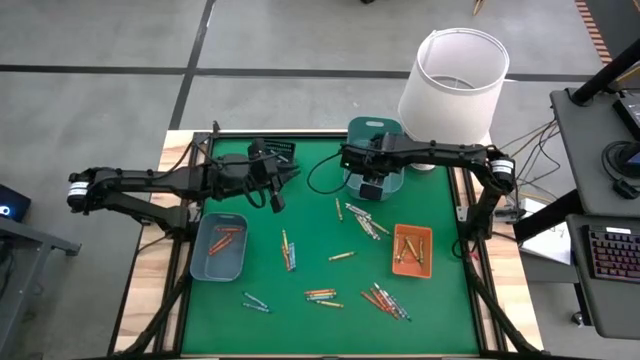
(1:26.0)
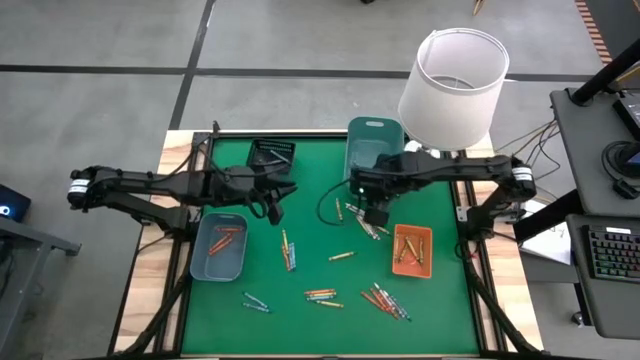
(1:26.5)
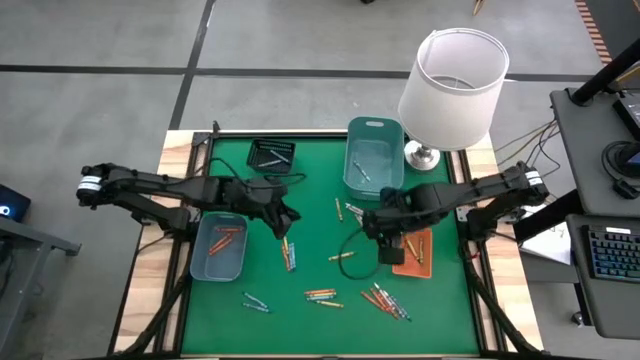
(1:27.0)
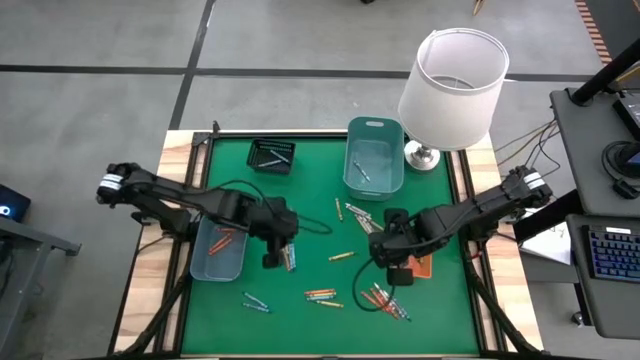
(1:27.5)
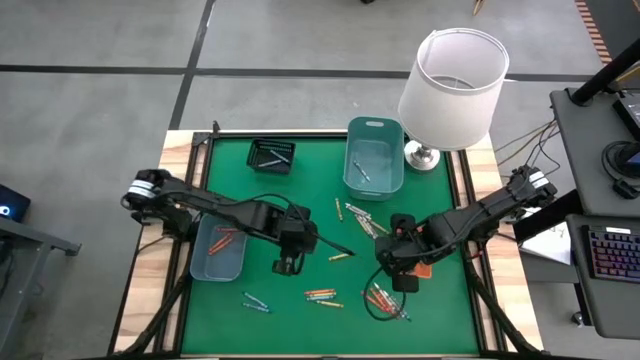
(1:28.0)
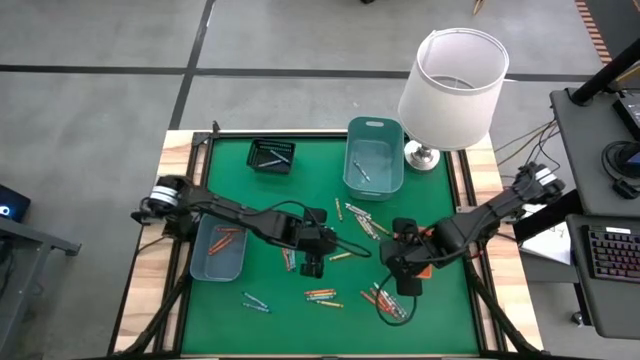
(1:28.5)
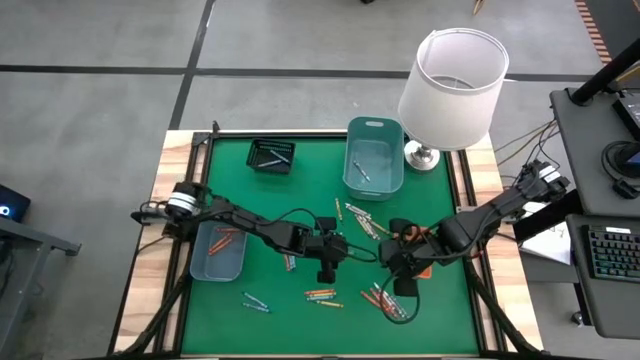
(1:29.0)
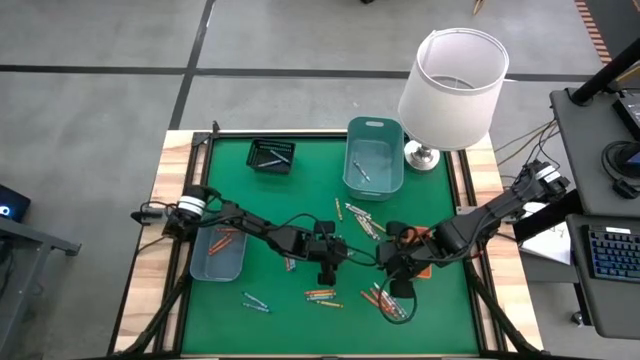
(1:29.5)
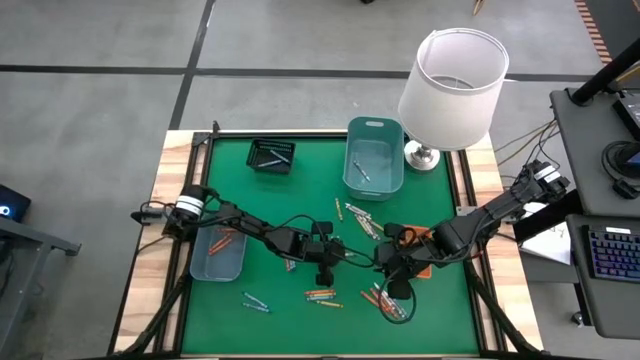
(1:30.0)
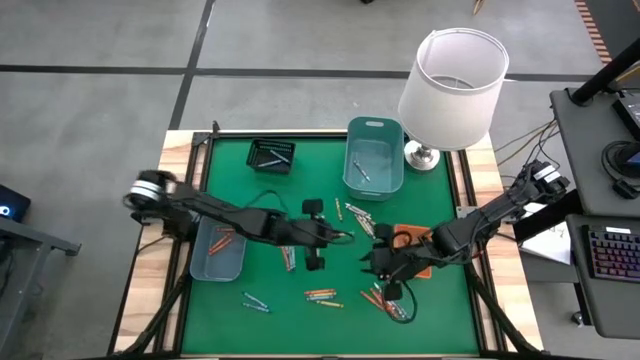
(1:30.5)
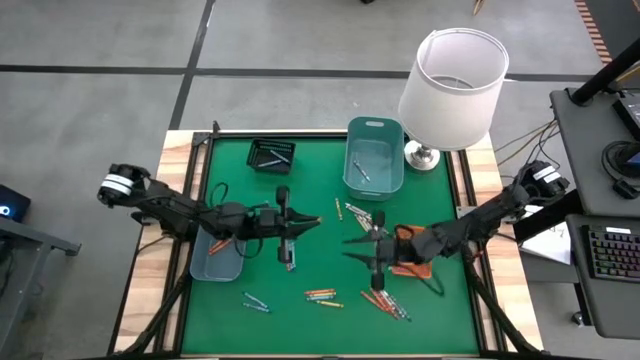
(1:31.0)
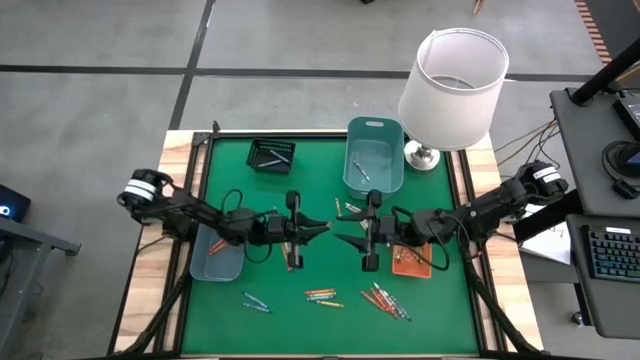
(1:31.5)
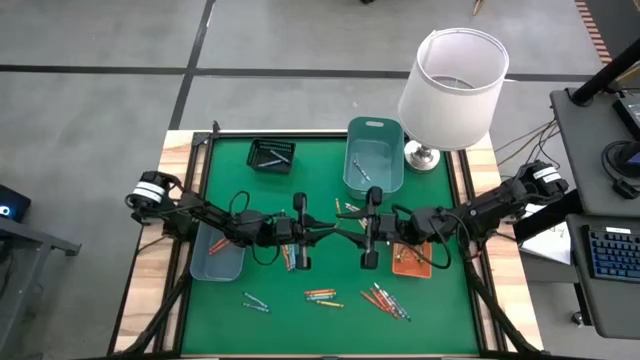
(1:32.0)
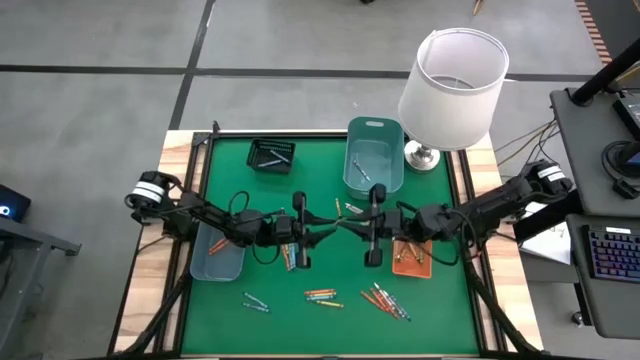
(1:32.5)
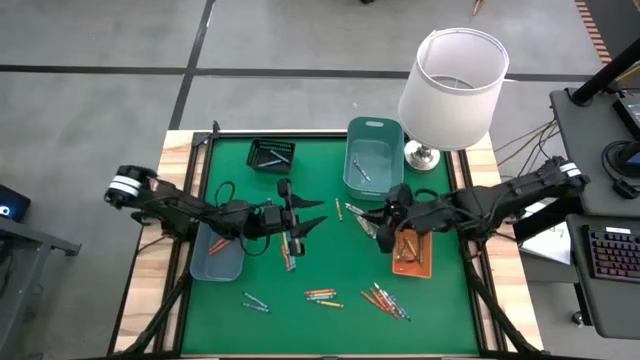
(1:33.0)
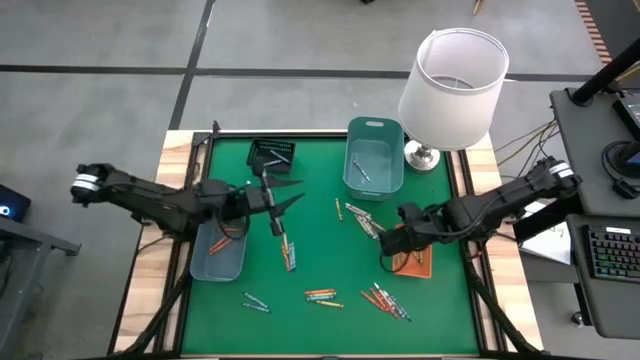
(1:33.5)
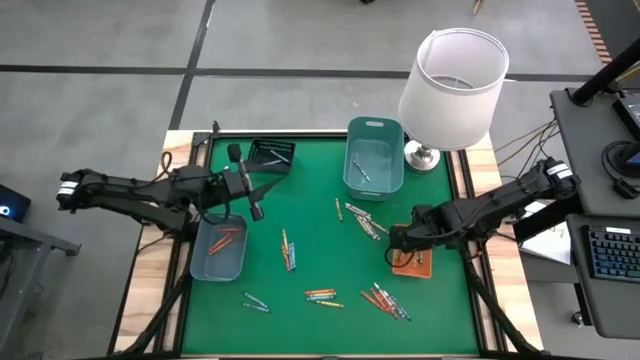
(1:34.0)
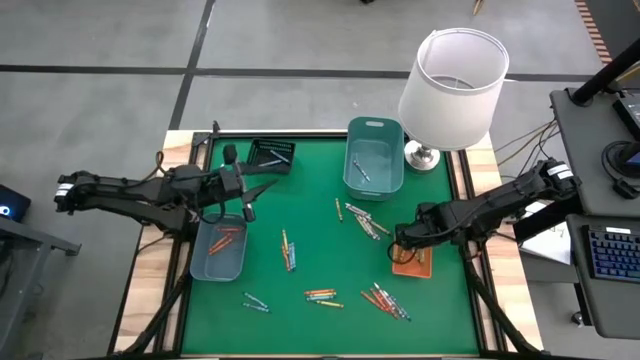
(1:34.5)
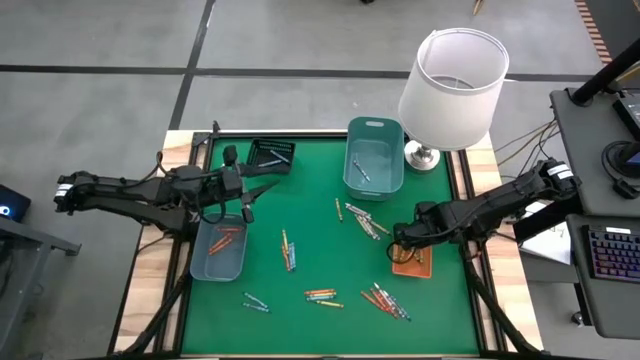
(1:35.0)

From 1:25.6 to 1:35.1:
Task: Sort crayons
Put the green crayon into the orange bin

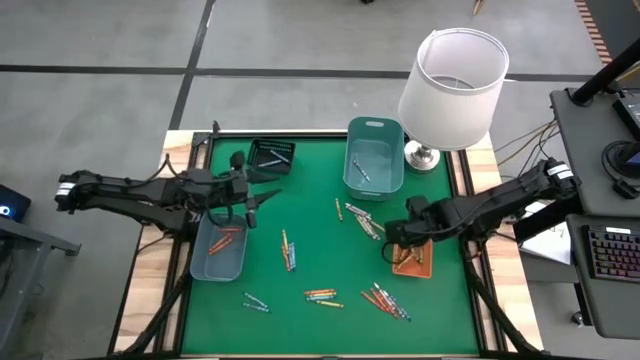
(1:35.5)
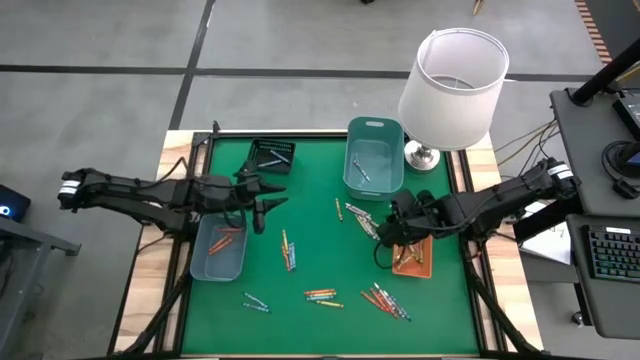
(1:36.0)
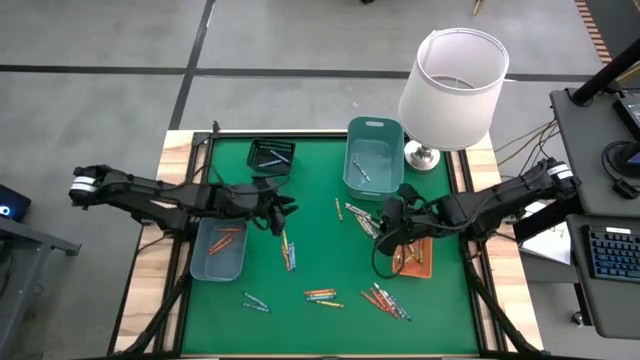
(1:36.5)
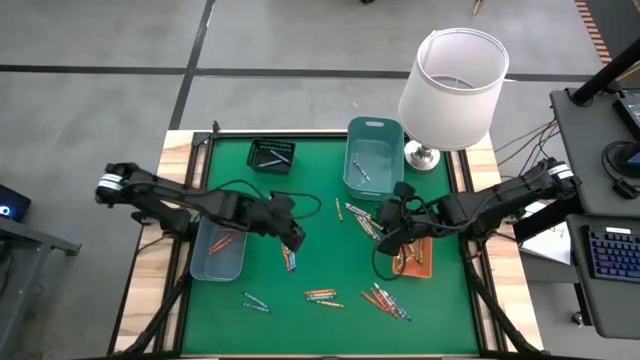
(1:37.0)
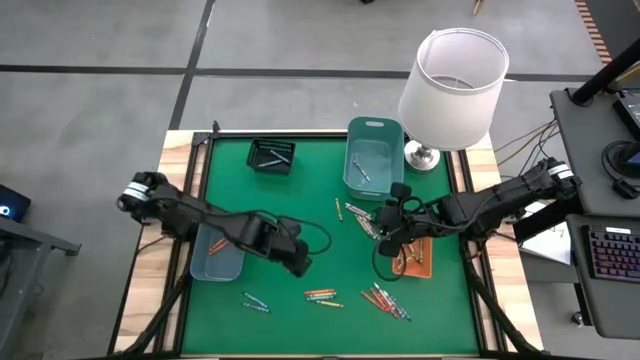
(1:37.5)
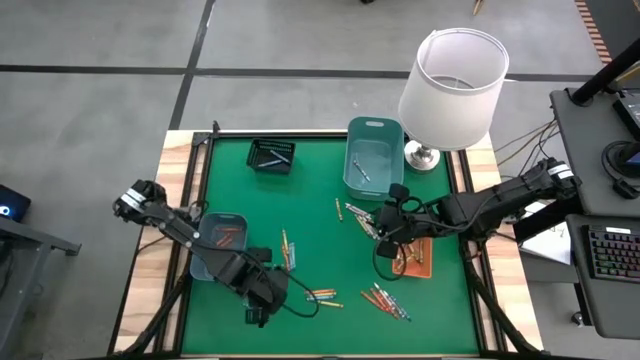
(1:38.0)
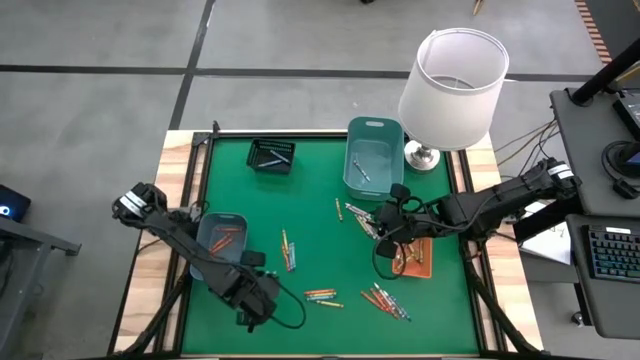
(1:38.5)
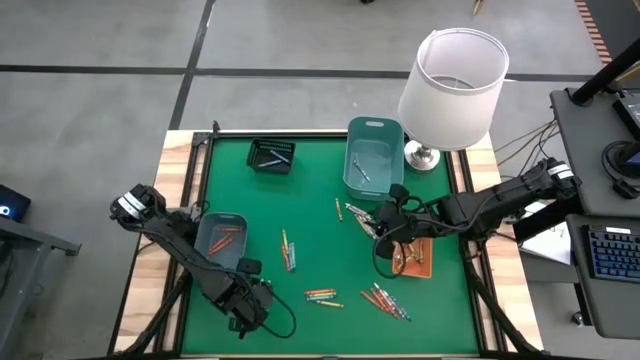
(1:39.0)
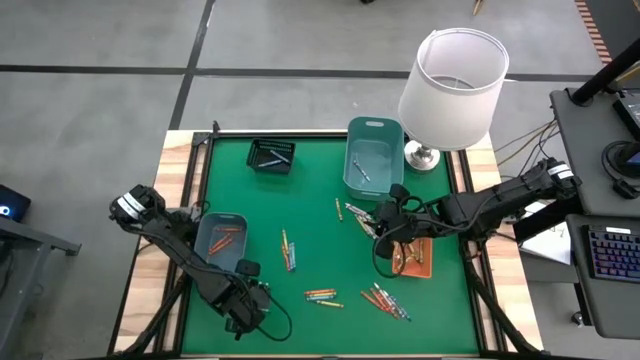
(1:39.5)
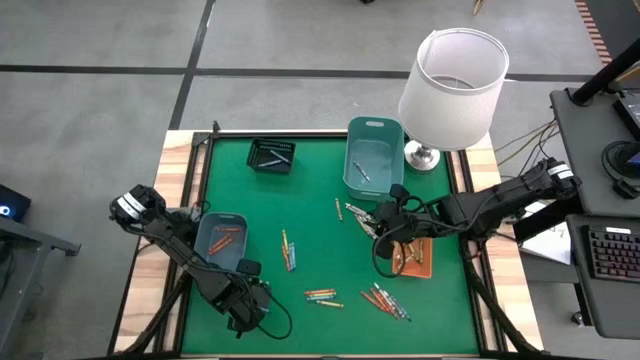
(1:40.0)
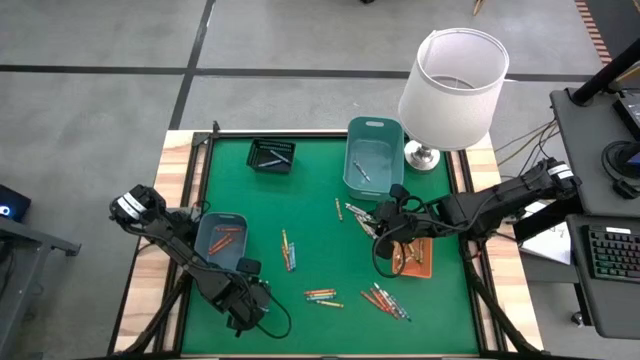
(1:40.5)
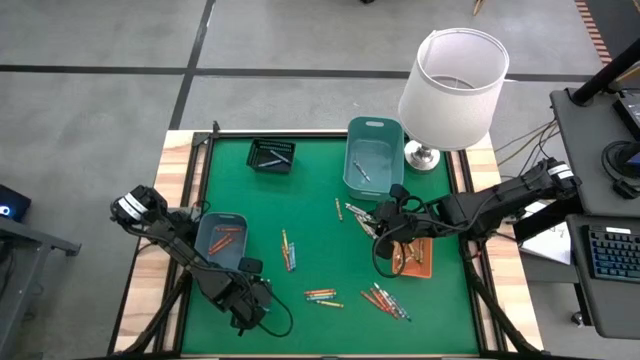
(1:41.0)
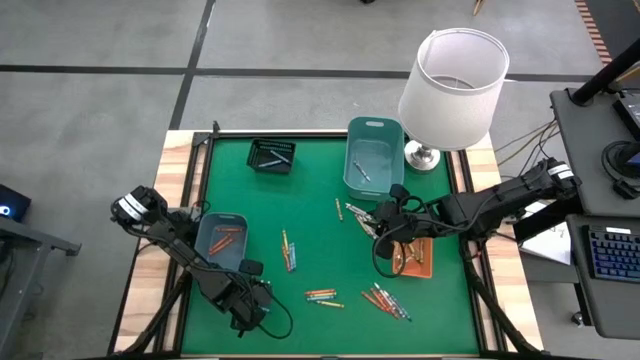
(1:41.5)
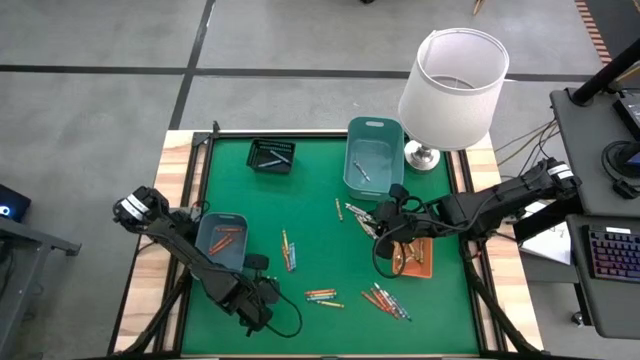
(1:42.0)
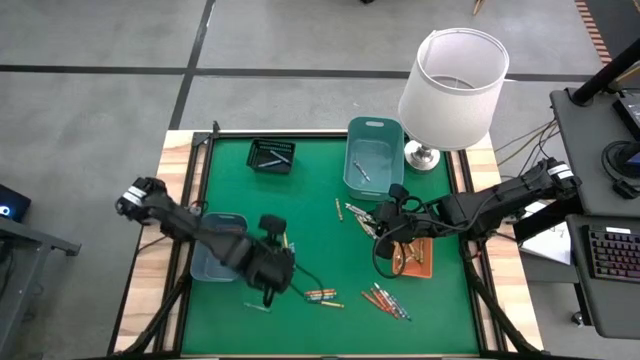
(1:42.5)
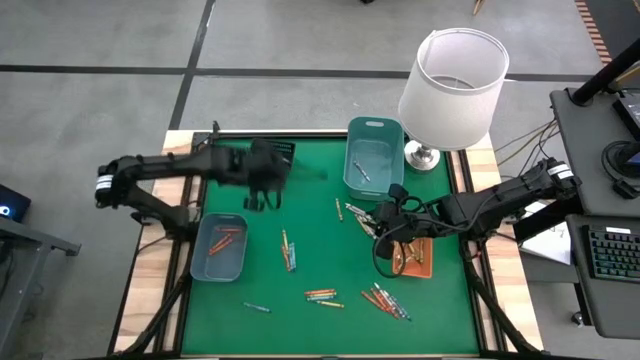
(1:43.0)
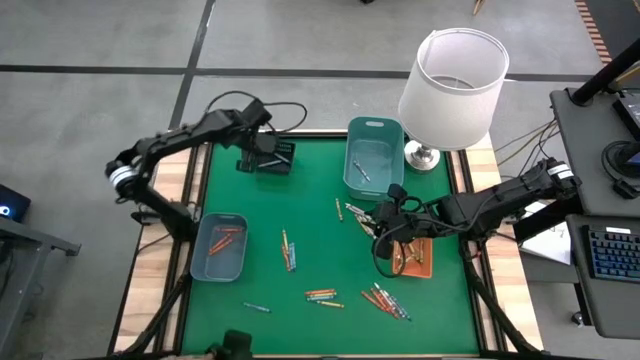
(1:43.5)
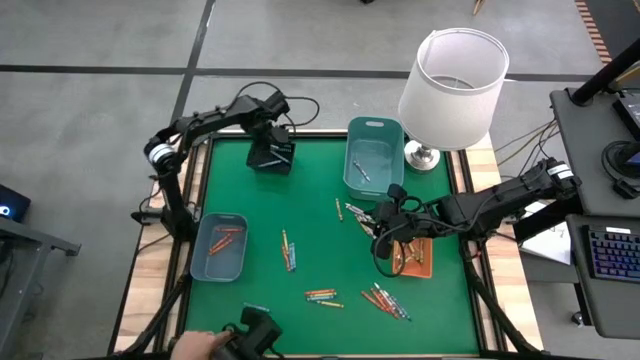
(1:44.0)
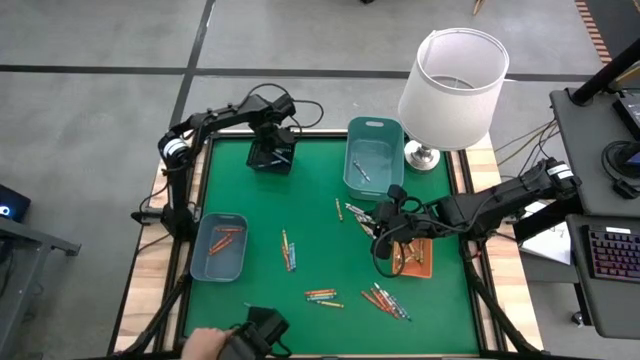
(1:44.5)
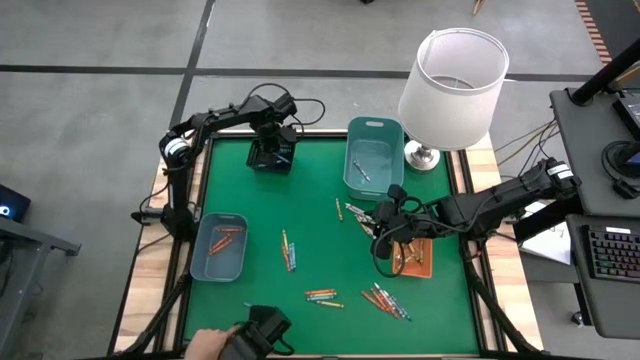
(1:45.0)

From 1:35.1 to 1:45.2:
Put the blue crayon into the black bin
